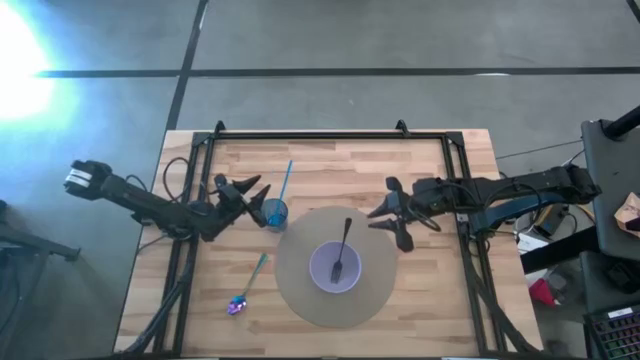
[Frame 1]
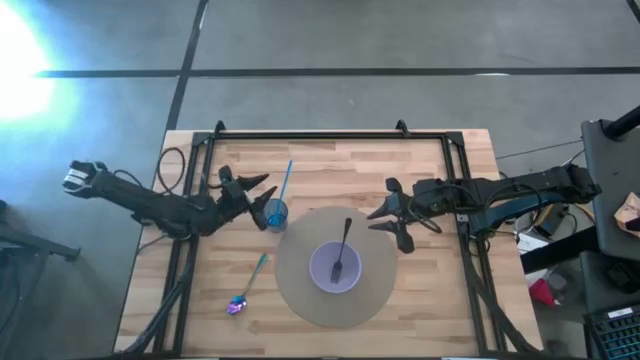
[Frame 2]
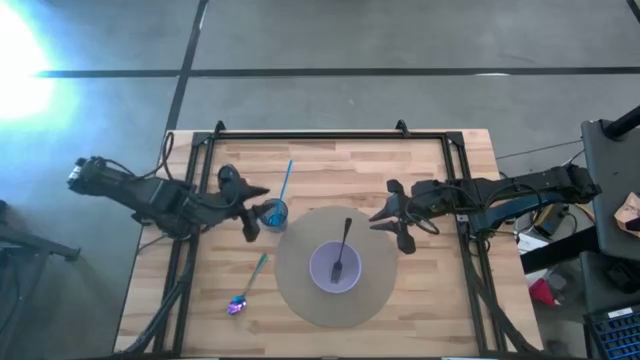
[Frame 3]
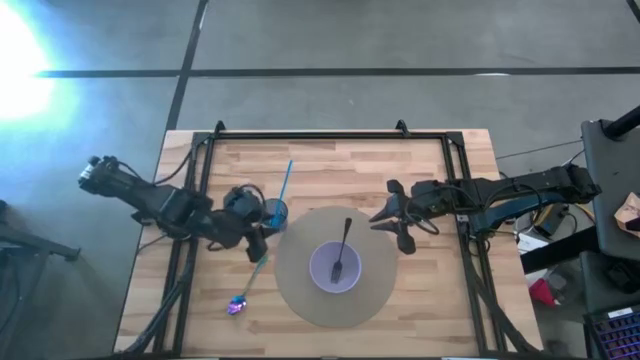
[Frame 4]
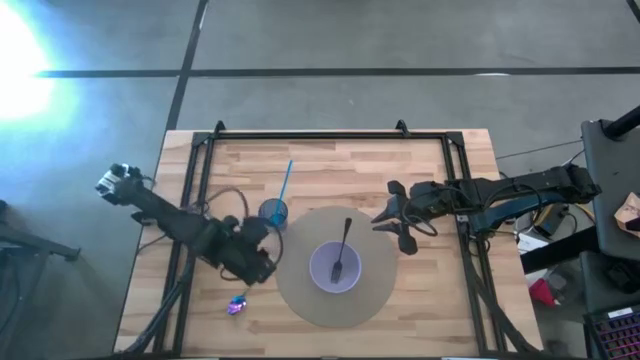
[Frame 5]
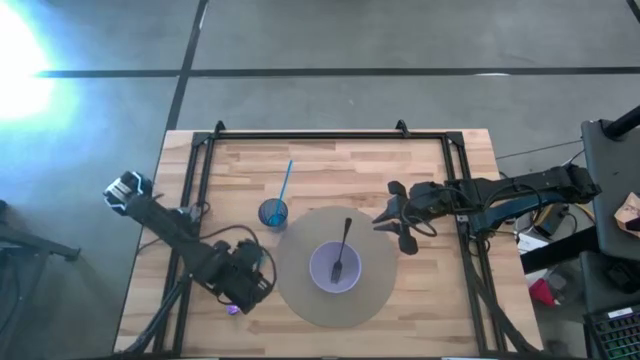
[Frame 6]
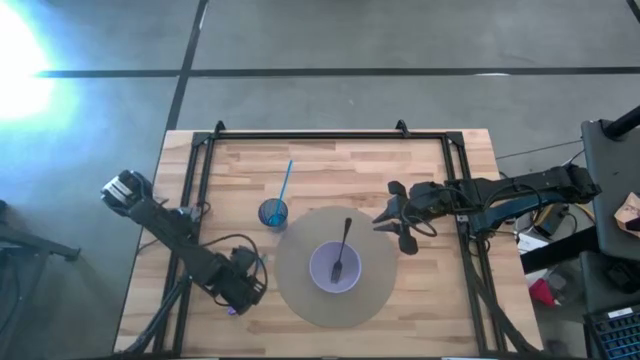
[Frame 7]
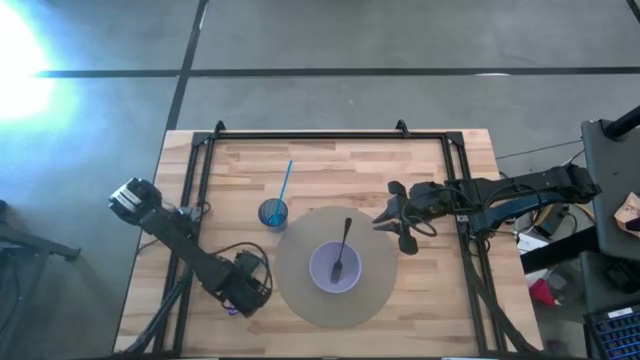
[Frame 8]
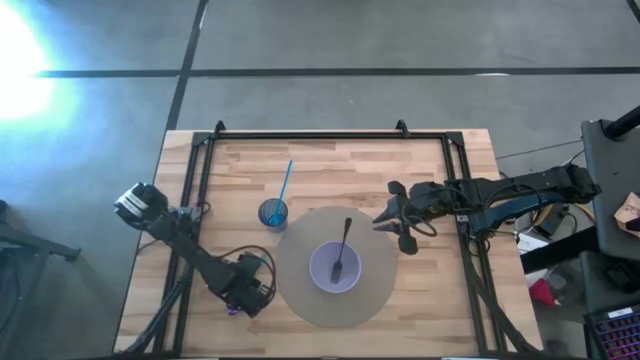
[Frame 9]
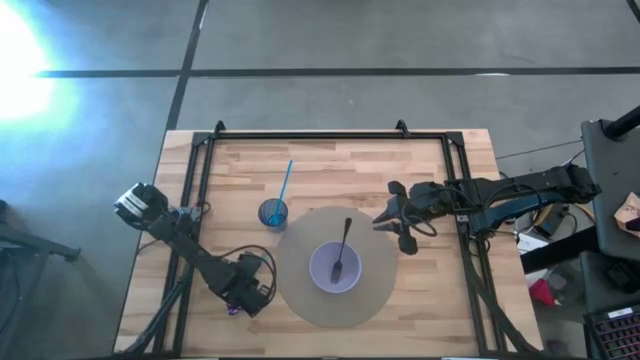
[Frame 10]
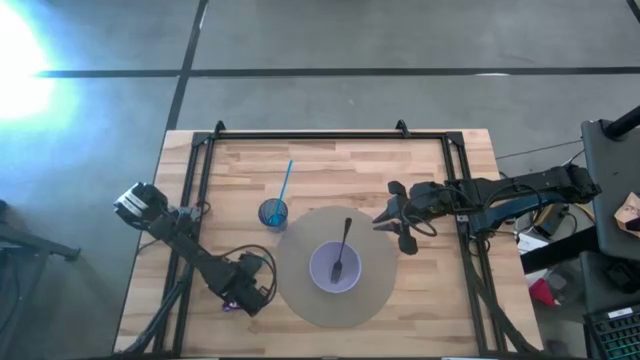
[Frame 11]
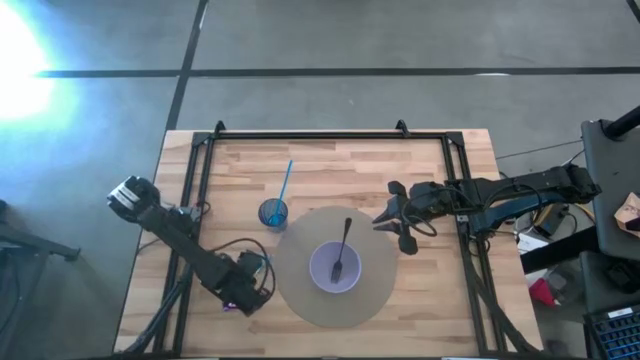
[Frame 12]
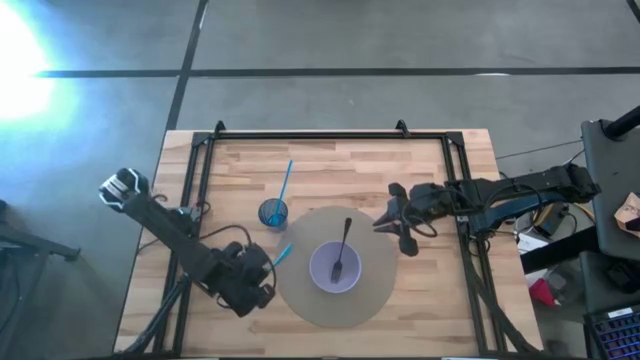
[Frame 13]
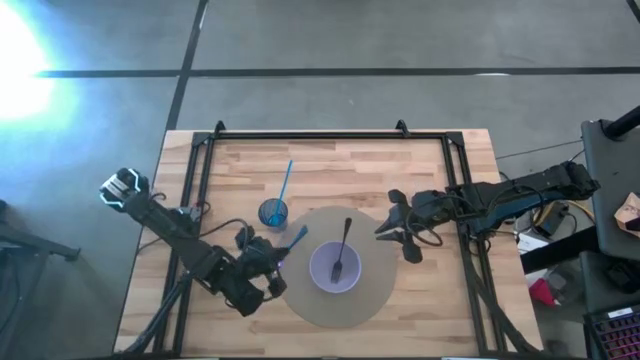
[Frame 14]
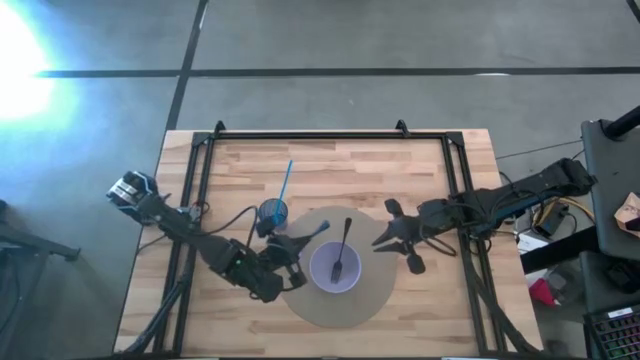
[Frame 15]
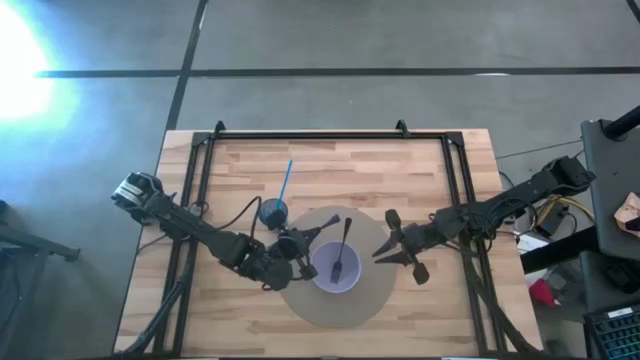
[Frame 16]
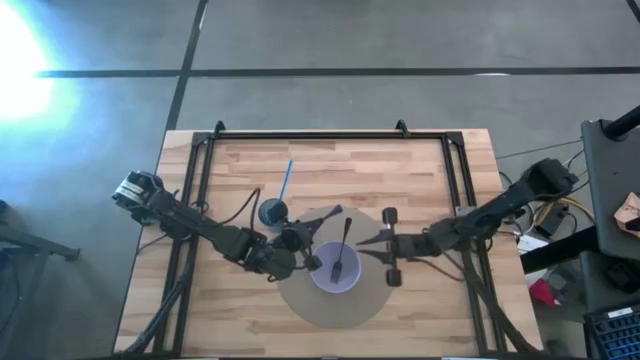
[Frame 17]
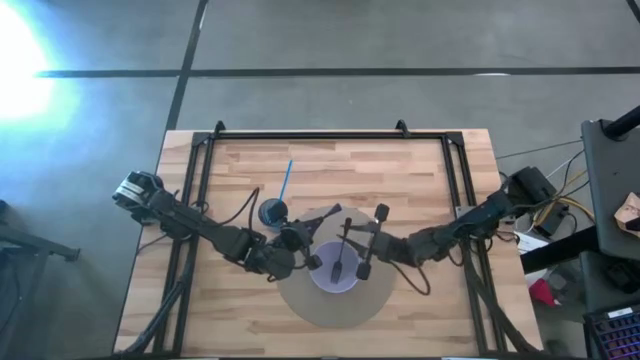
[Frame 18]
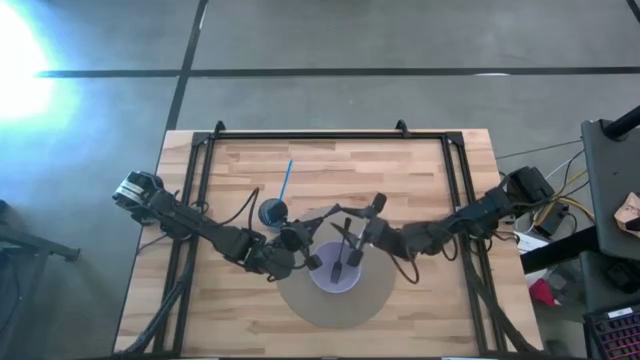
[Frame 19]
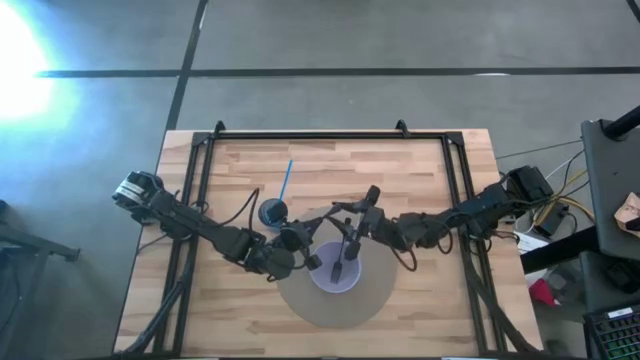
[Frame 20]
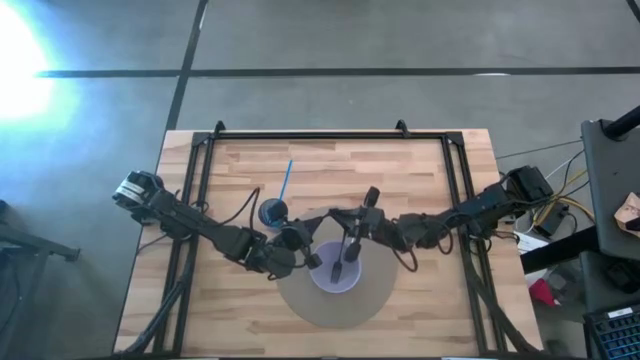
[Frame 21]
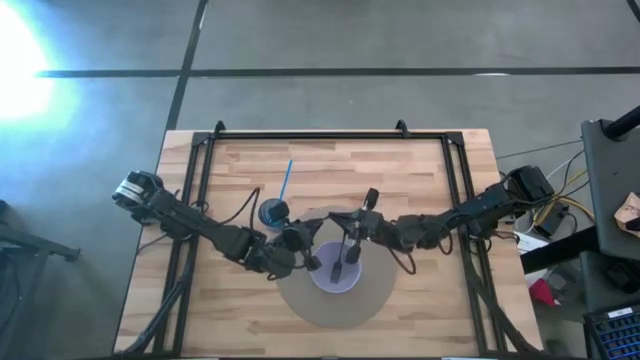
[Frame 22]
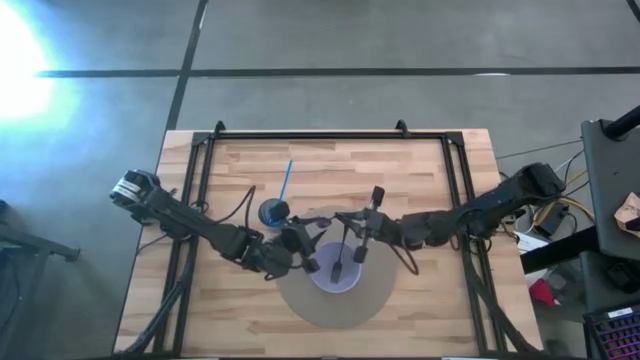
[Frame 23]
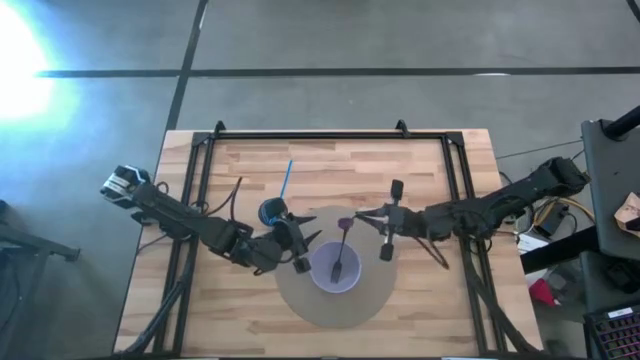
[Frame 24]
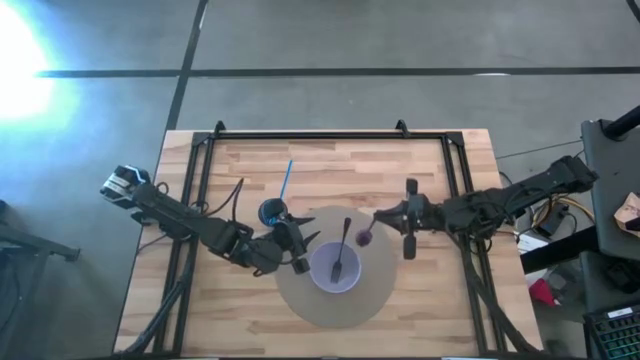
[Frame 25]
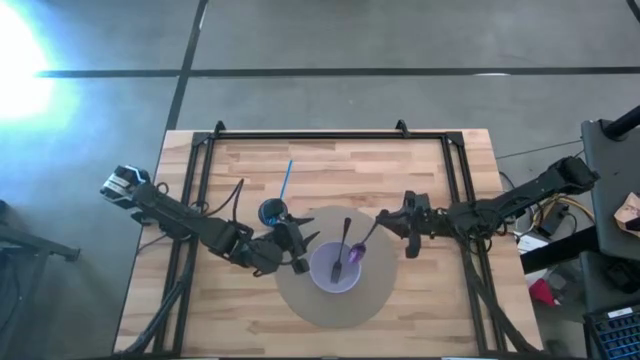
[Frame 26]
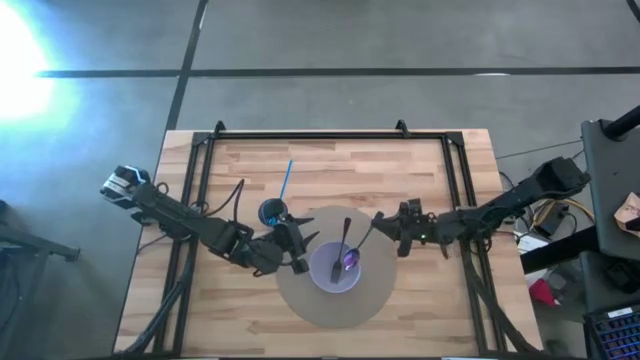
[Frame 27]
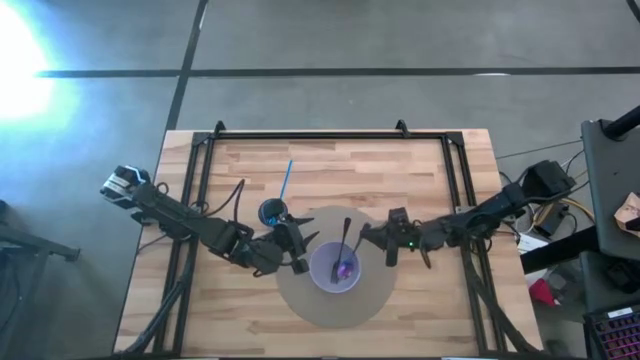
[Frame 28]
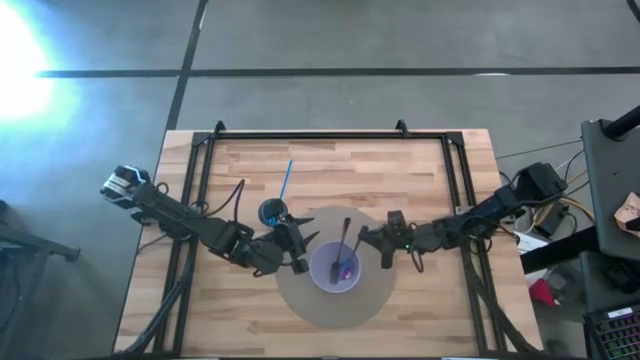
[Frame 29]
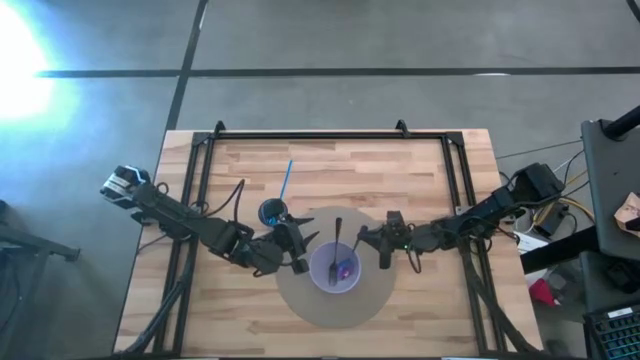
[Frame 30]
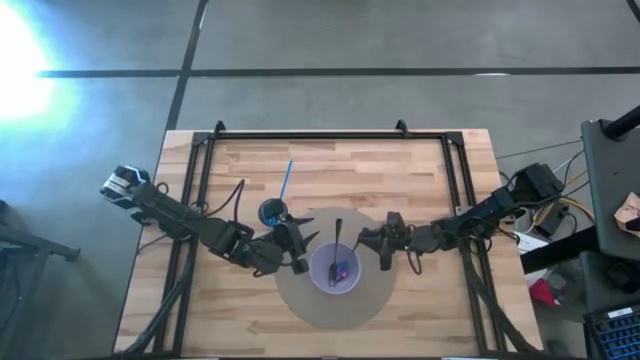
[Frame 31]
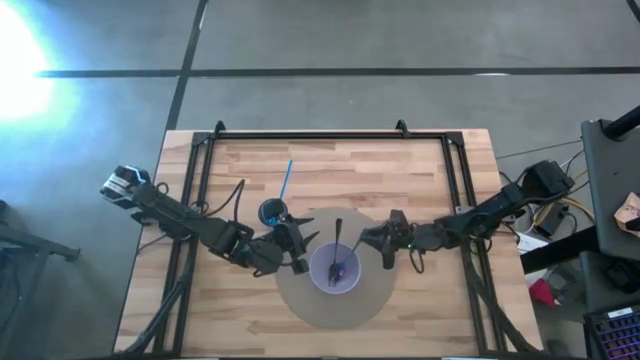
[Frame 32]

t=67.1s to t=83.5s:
Task: Pick & Place Utensil
Put the blue spoon into the violet bowl

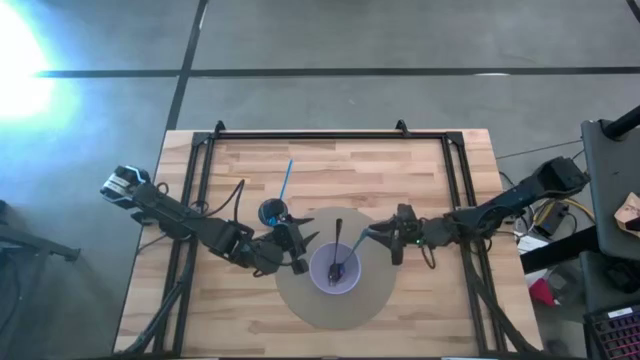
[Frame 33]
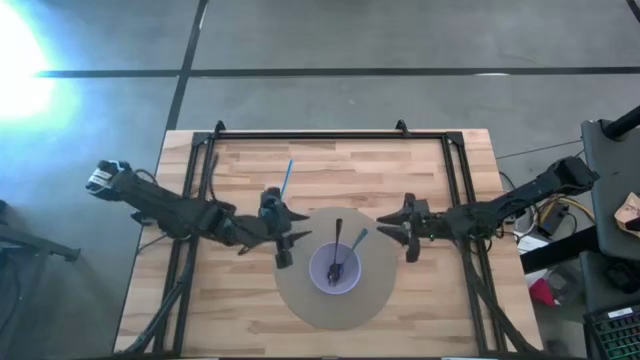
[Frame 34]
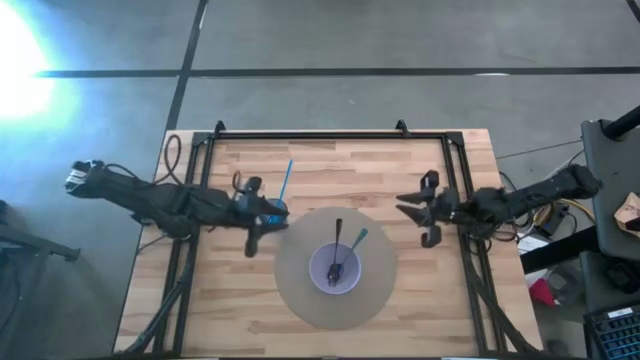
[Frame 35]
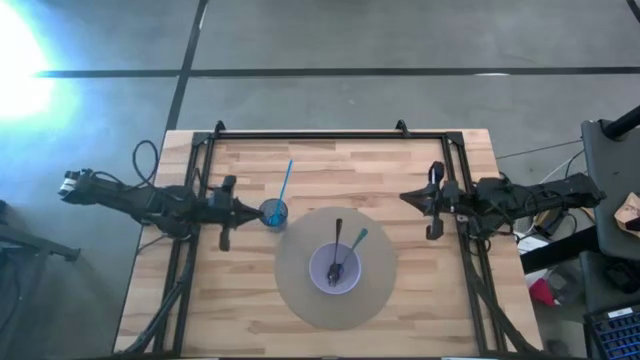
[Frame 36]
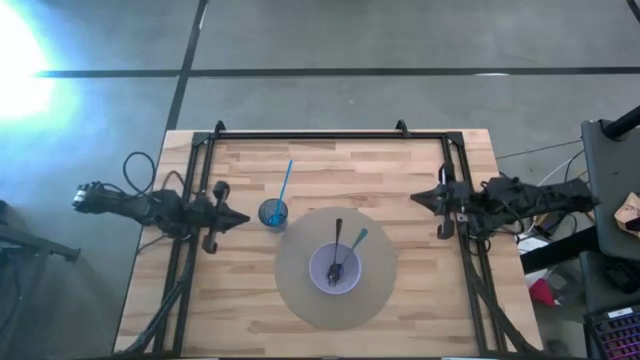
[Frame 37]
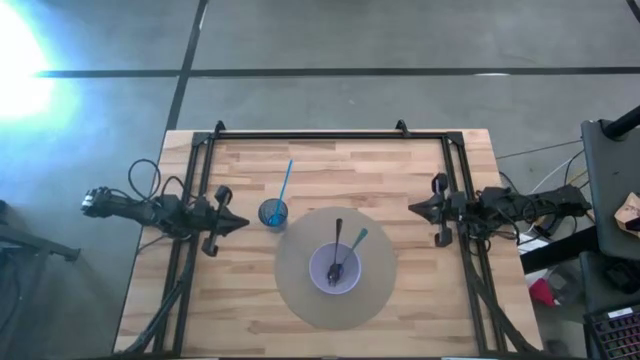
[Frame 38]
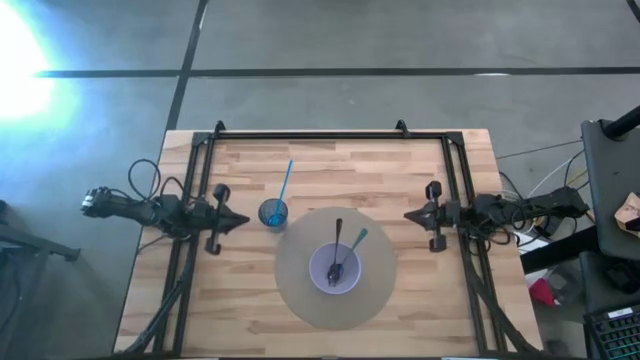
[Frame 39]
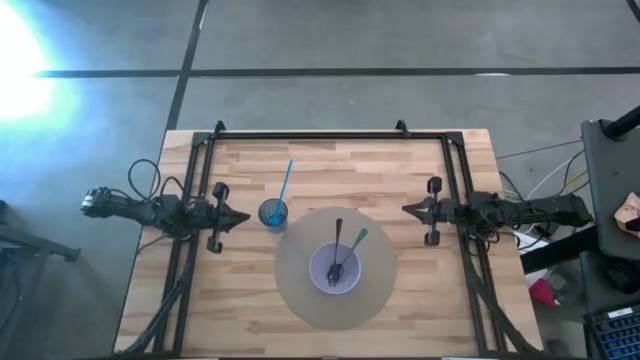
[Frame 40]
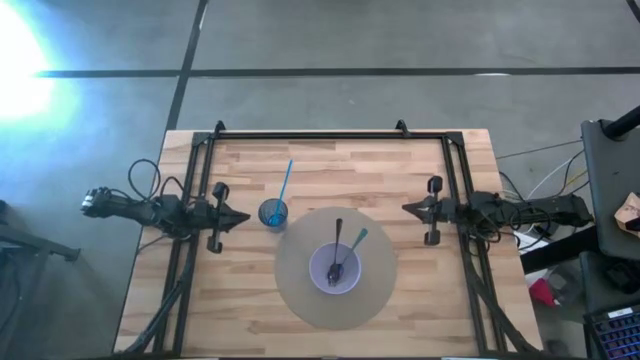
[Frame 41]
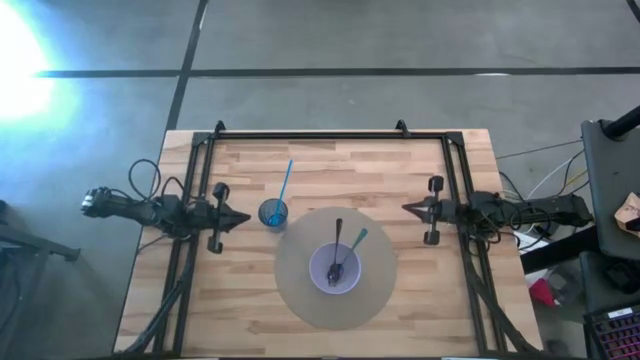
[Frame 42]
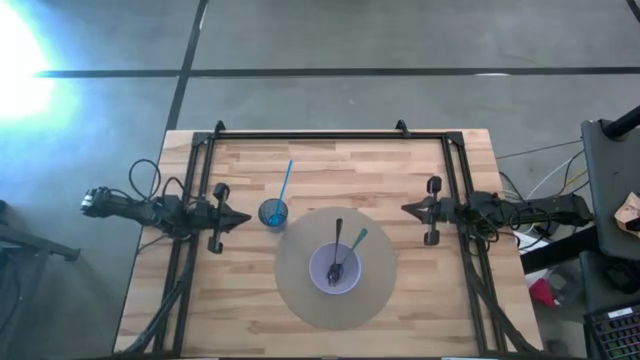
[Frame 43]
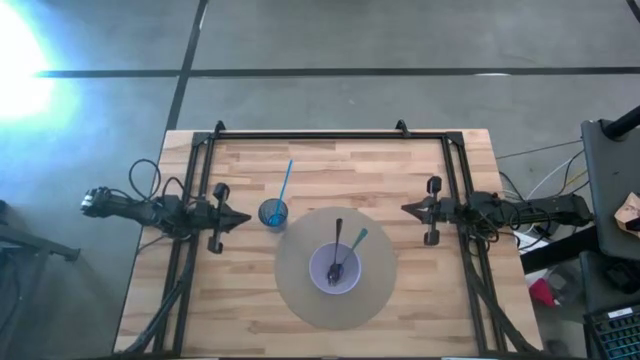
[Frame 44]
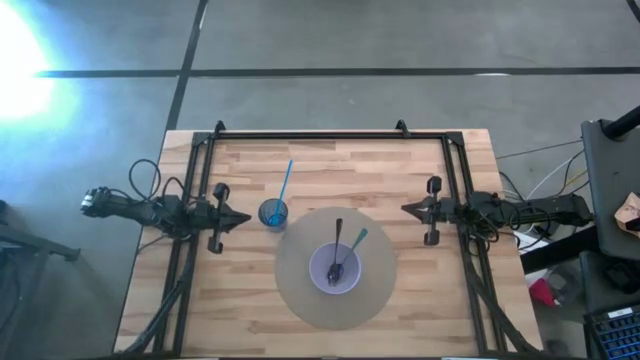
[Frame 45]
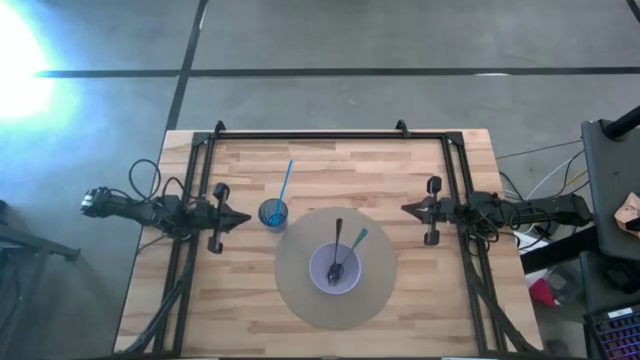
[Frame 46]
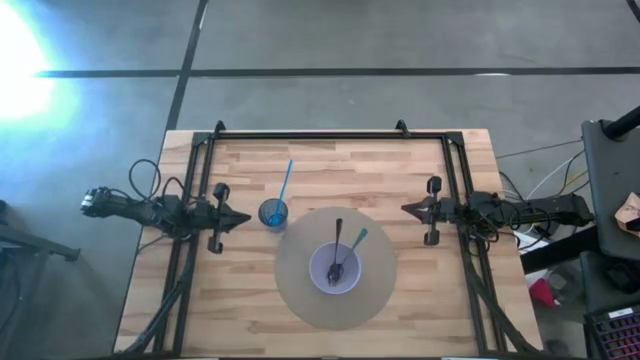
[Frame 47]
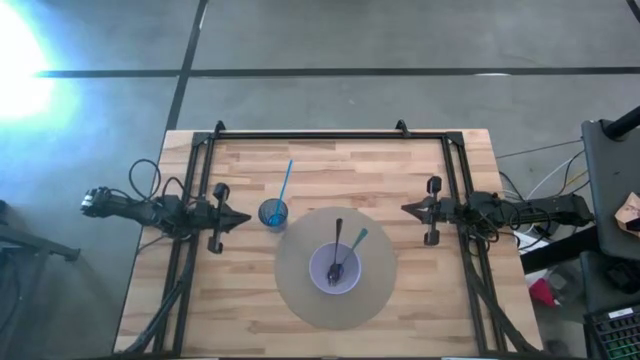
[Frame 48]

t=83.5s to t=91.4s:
Return to Home Position
